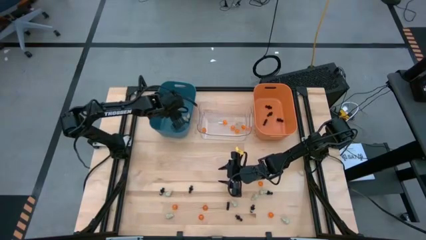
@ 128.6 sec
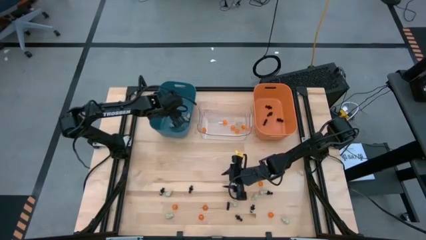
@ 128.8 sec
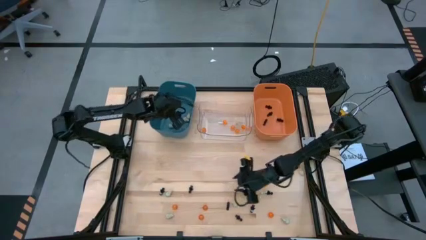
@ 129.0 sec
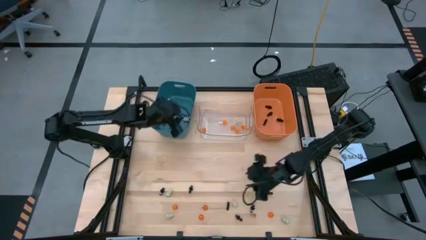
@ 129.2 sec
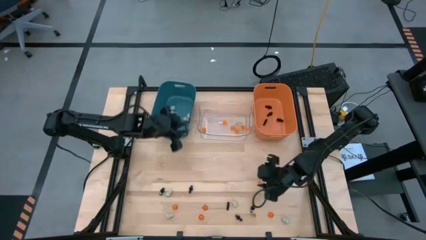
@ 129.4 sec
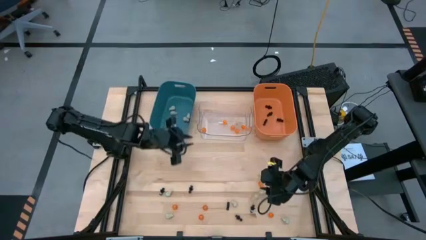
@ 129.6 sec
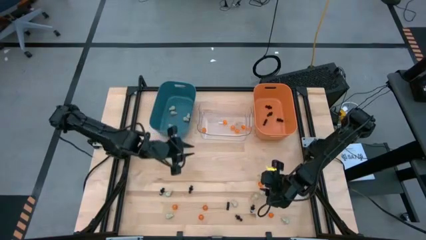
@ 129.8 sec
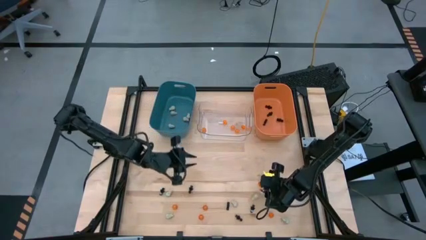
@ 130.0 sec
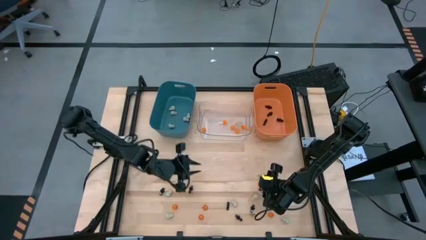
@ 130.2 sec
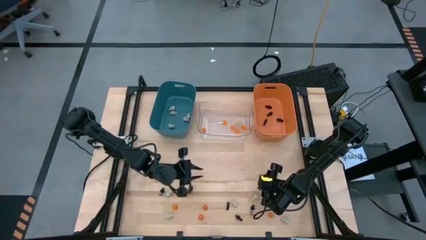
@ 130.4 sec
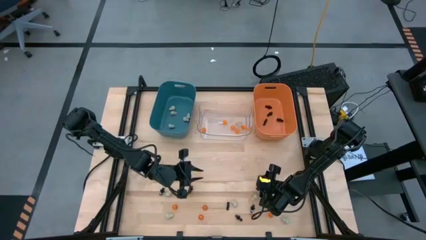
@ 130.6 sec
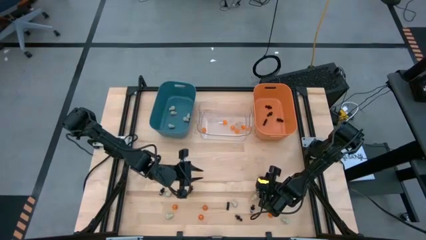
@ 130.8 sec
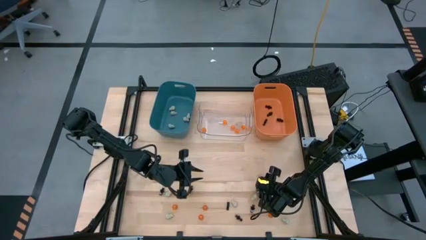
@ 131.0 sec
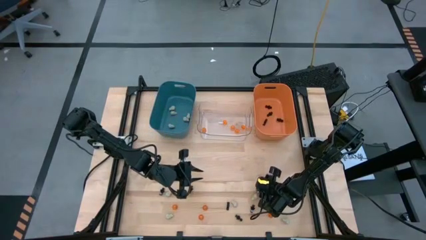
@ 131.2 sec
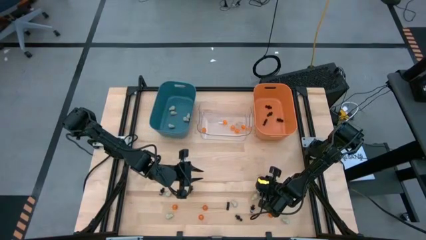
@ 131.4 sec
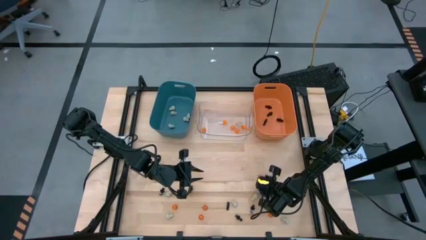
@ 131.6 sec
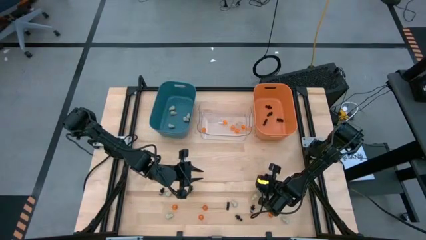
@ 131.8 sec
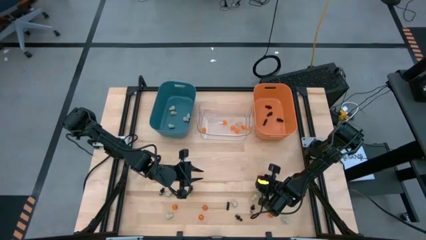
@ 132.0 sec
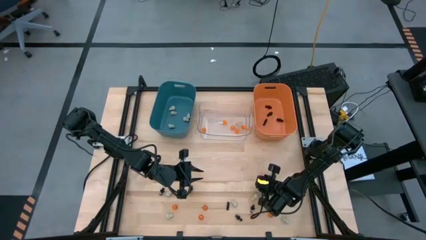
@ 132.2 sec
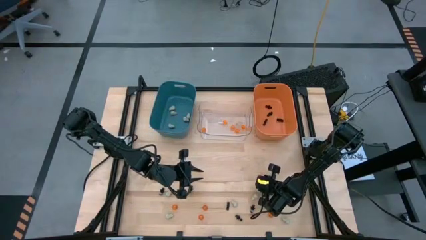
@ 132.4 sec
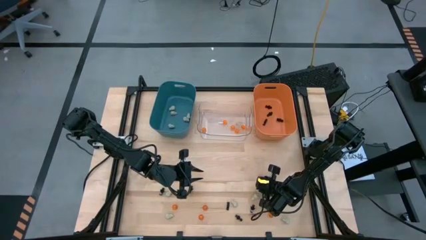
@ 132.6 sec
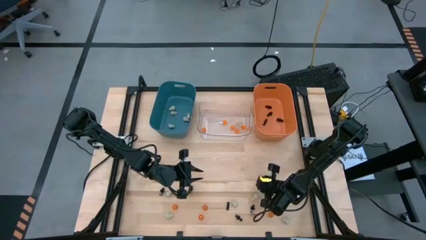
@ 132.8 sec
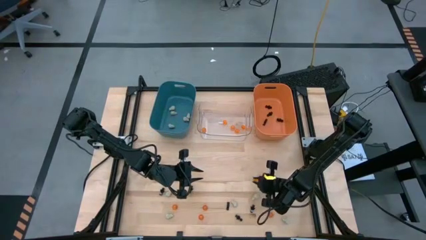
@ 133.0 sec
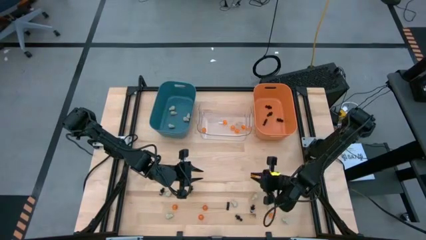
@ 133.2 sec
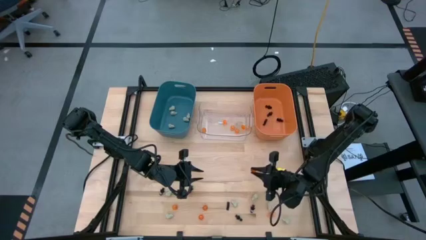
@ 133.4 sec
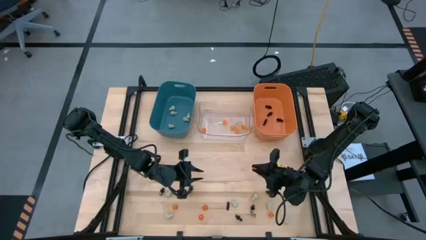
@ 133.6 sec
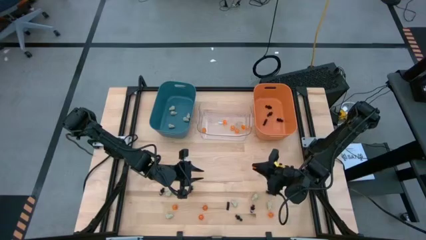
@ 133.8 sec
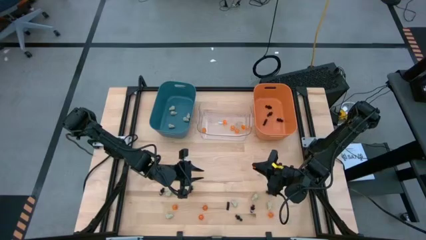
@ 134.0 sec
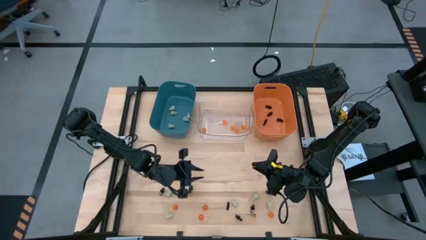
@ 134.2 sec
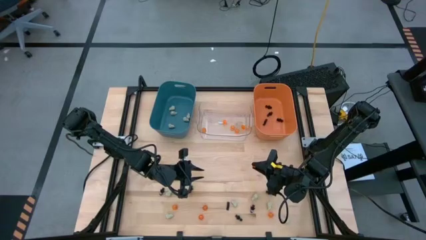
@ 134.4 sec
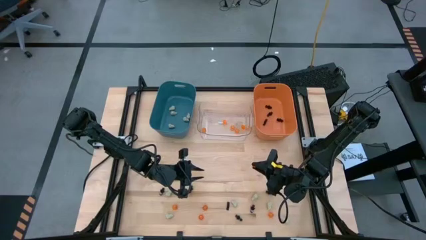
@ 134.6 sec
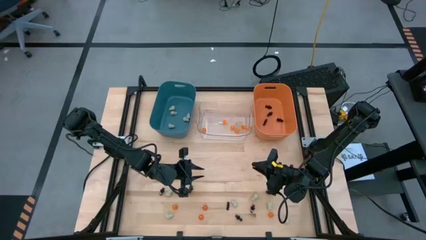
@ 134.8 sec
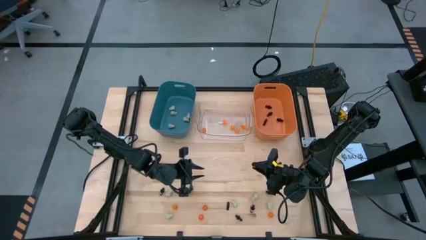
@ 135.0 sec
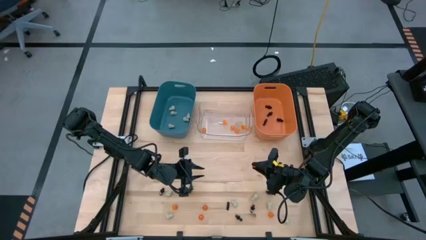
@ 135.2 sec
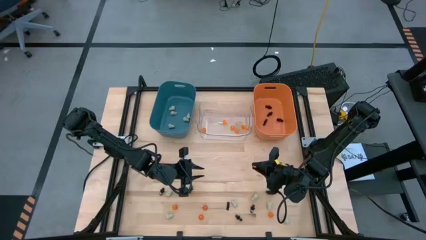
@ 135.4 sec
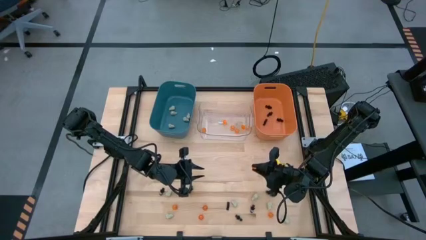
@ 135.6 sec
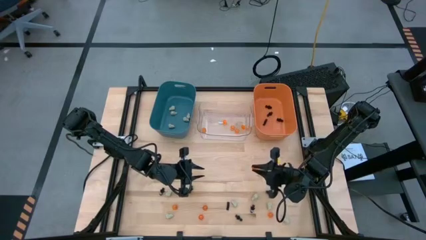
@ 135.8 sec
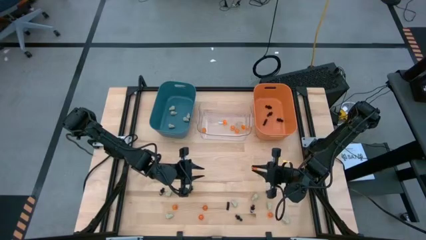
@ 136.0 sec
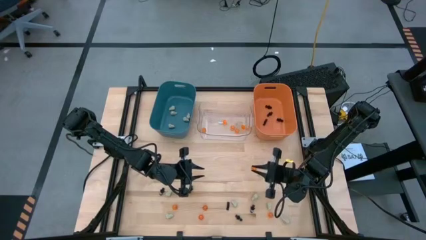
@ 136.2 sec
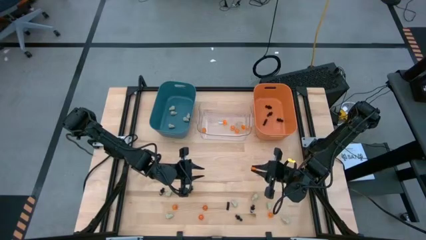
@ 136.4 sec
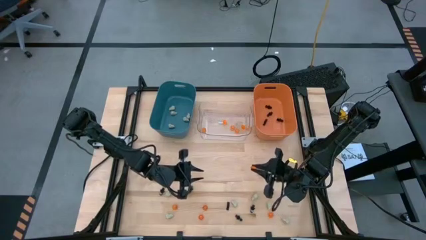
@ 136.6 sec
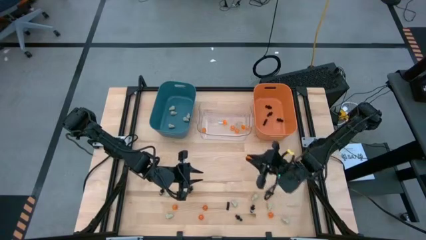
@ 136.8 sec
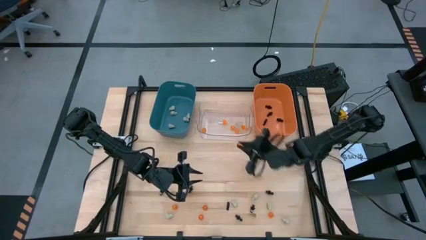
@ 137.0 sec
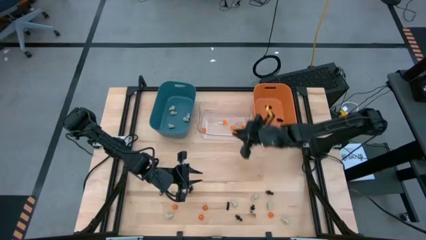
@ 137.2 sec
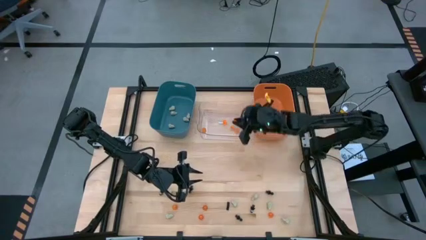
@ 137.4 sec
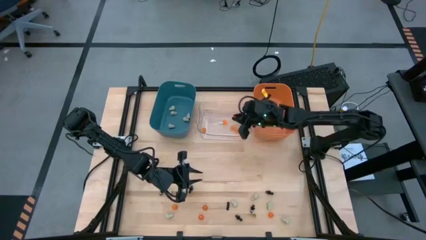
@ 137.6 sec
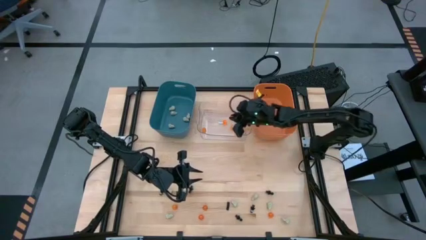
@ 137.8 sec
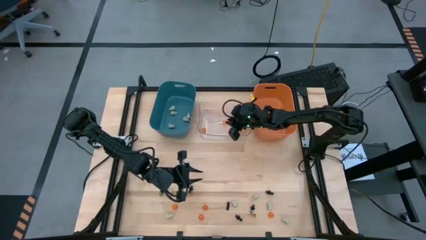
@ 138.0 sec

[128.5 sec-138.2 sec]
Task: Sort Halloween decoration
Put the orange pumpkin toy into the transparent bin

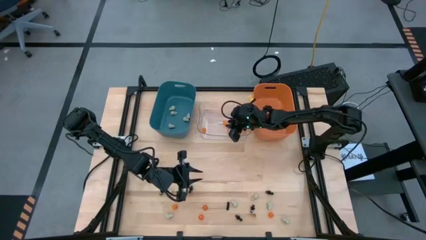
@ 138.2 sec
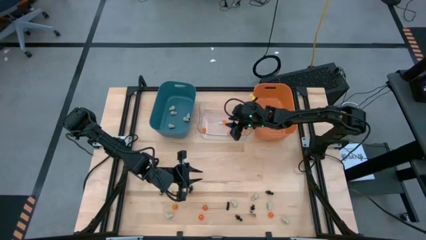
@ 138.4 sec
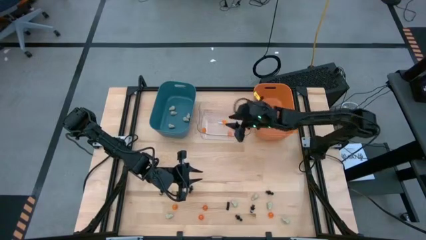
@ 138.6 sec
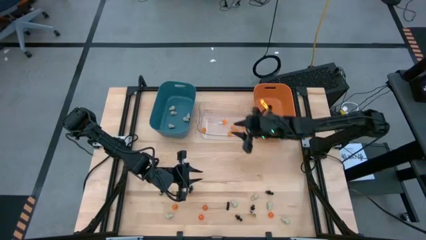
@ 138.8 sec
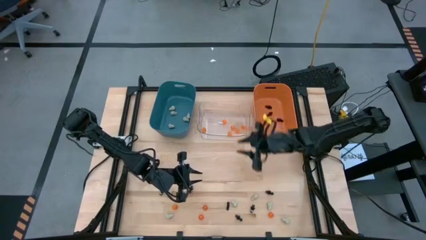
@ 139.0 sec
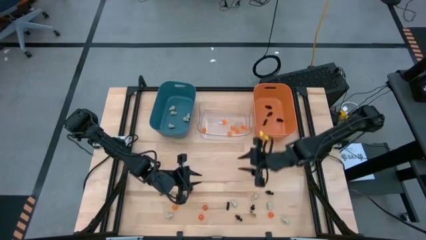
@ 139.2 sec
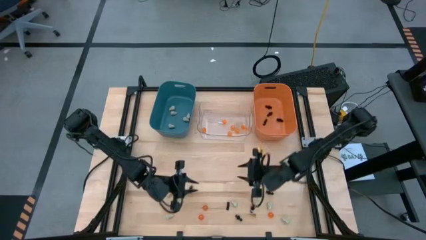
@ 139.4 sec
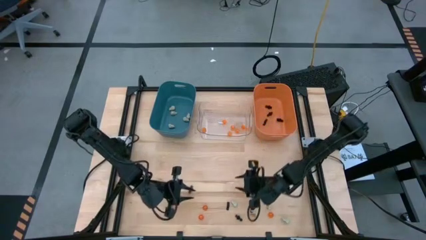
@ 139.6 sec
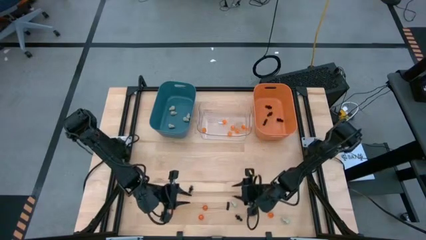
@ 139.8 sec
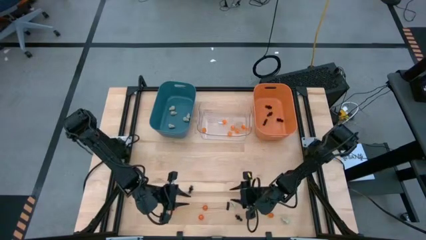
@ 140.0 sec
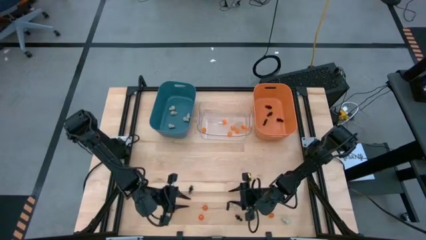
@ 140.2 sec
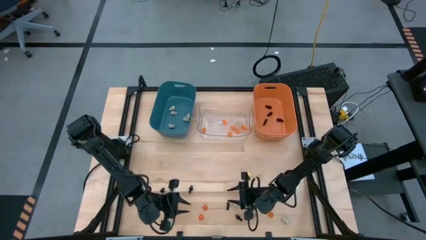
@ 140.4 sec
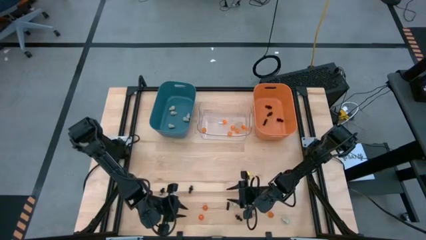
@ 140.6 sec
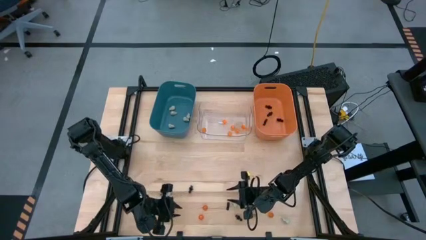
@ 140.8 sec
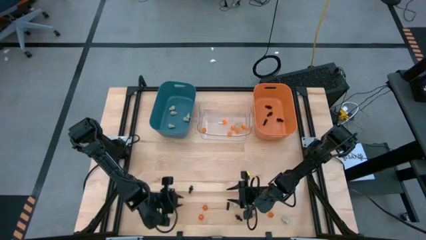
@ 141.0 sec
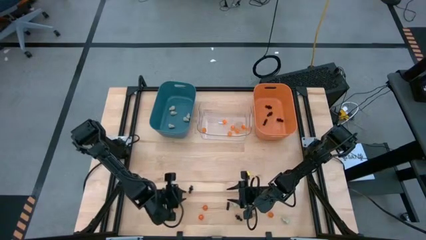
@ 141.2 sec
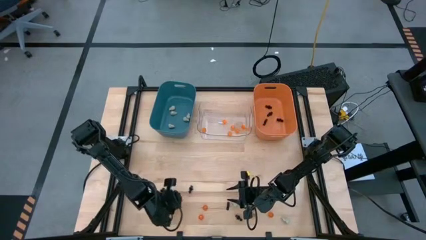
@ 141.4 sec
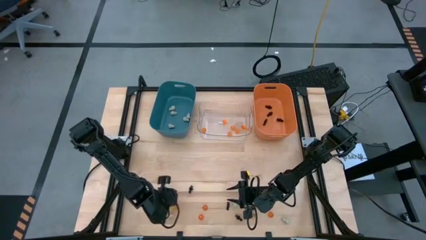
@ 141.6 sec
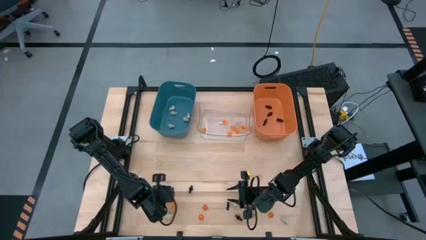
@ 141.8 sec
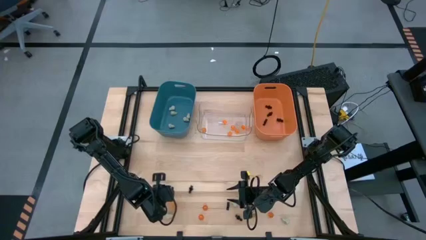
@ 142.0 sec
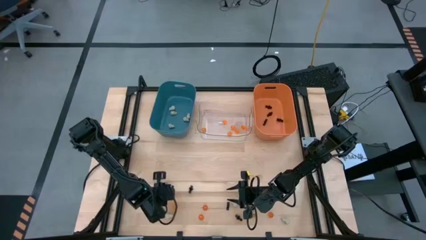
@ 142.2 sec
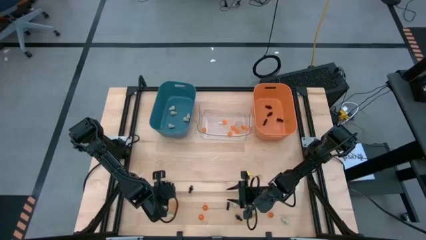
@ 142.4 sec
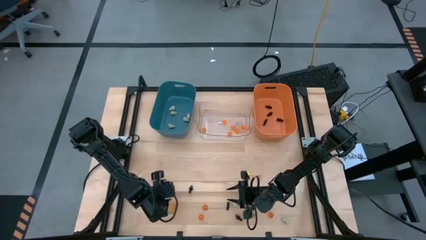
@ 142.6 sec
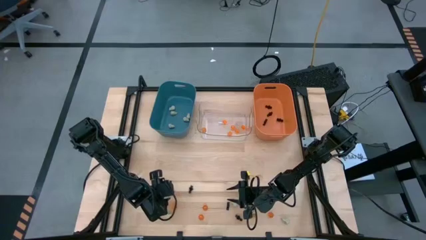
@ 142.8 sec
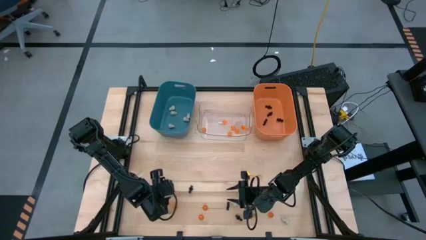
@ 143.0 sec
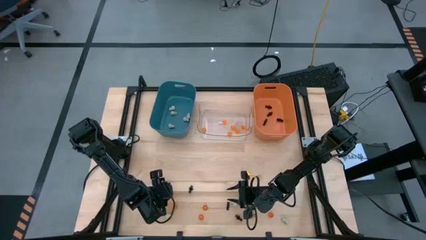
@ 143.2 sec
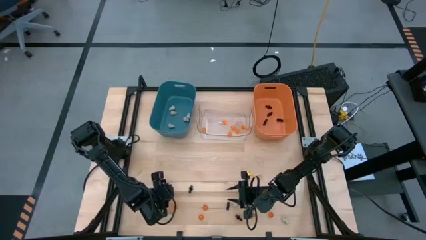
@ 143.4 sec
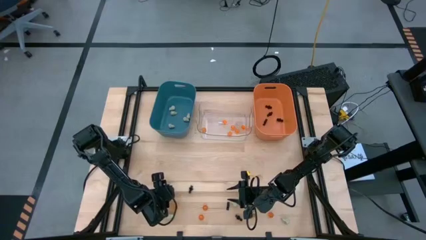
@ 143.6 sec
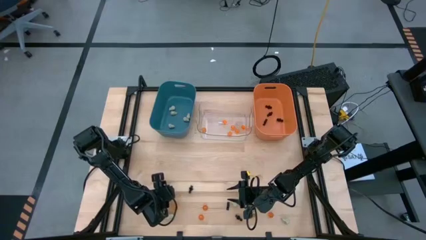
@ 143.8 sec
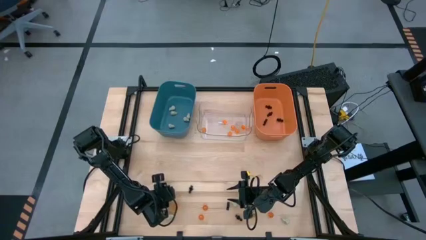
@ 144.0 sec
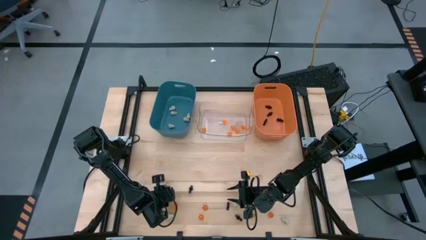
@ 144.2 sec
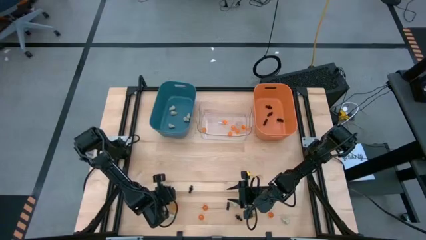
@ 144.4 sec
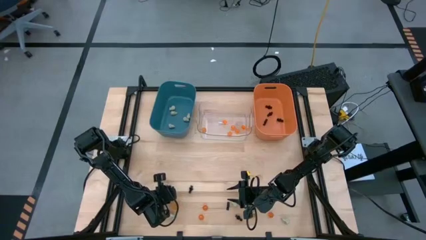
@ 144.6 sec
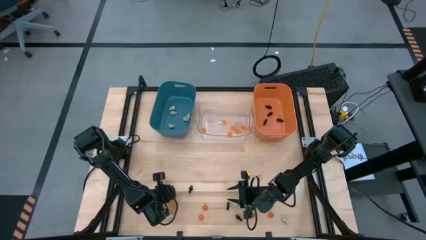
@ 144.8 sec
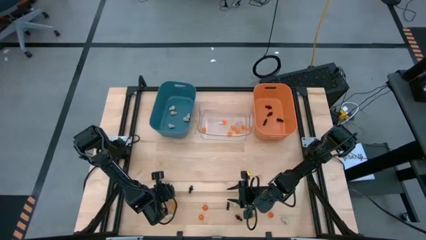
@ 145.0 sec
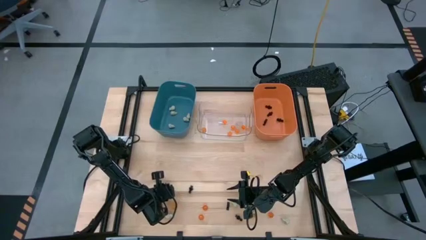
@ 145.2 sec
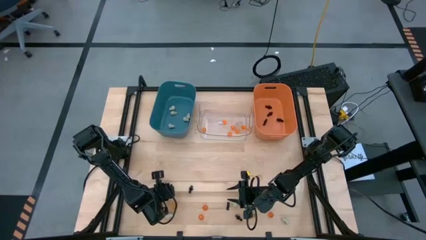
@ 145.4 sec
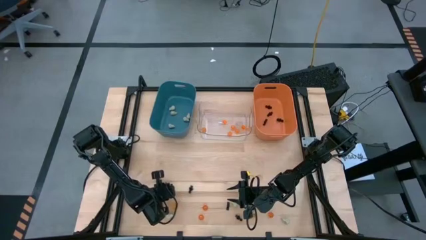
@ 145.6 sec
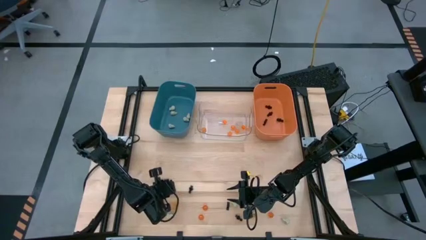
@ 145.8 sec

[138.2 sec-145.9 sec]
Put the white skull toy into the blue bin
